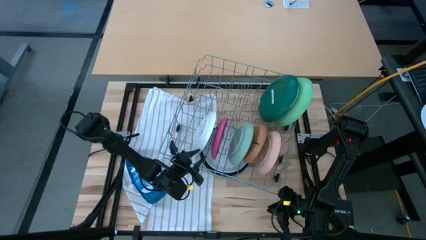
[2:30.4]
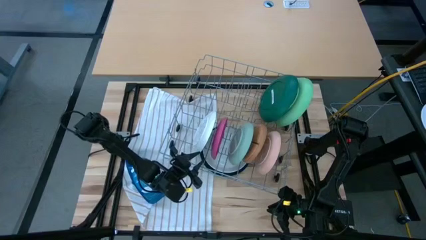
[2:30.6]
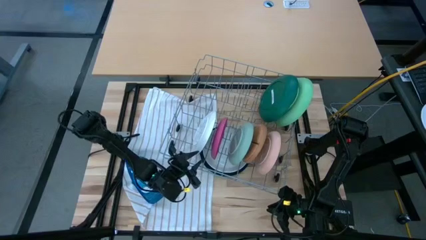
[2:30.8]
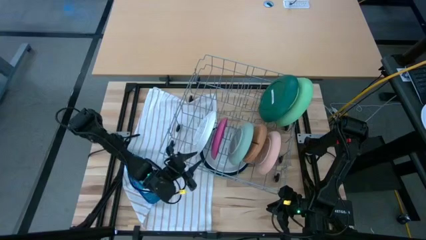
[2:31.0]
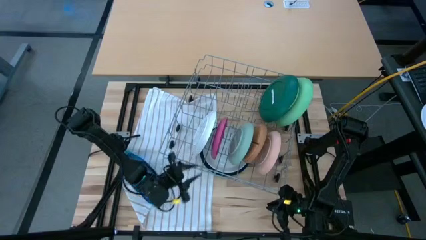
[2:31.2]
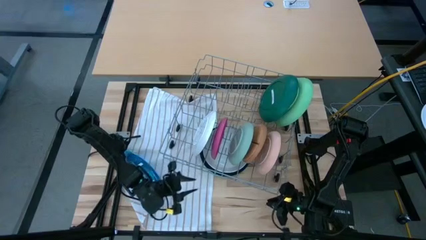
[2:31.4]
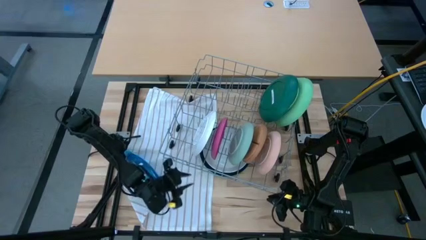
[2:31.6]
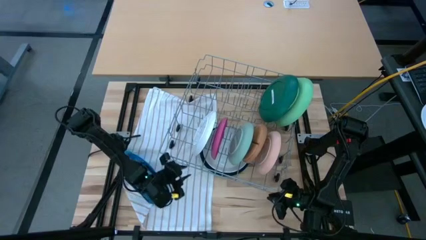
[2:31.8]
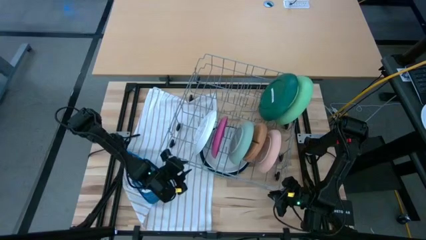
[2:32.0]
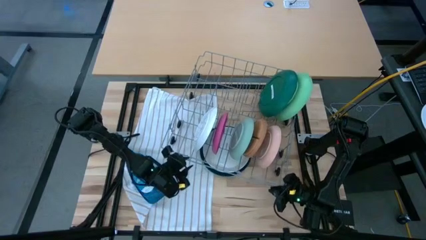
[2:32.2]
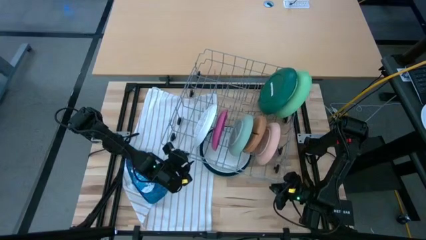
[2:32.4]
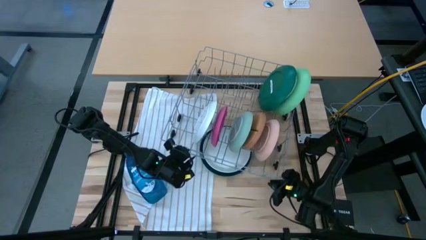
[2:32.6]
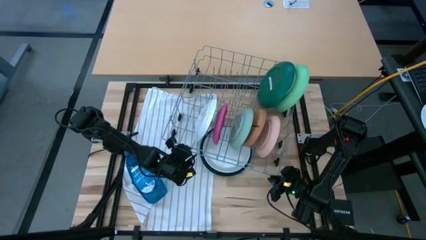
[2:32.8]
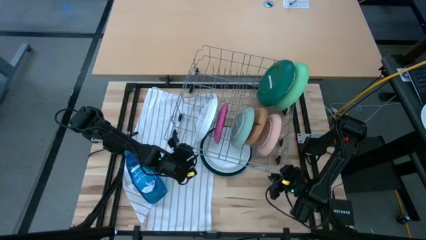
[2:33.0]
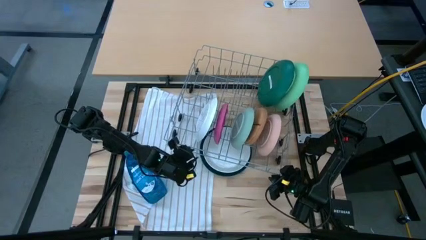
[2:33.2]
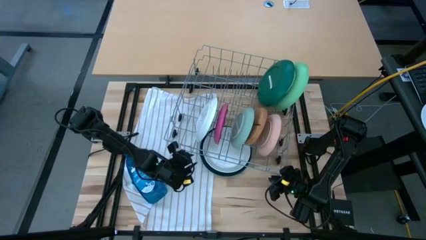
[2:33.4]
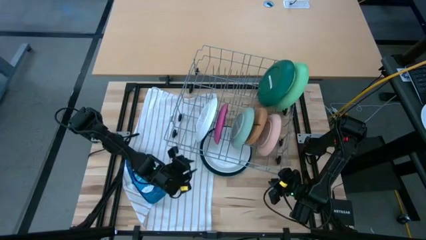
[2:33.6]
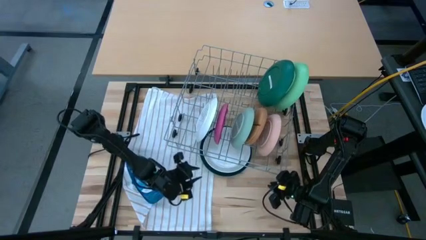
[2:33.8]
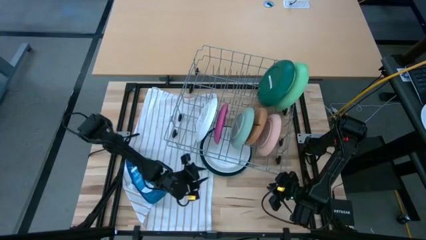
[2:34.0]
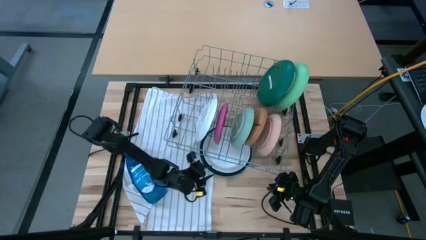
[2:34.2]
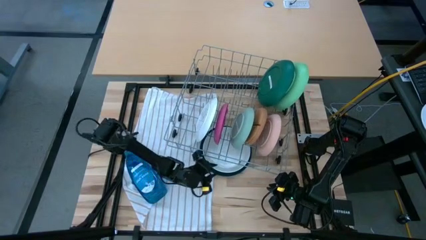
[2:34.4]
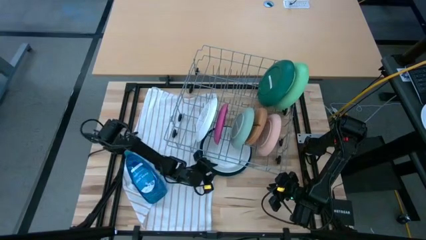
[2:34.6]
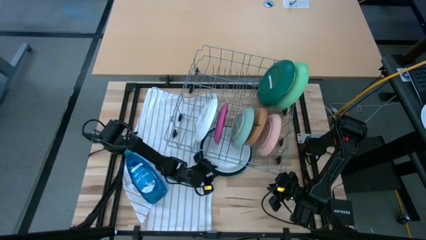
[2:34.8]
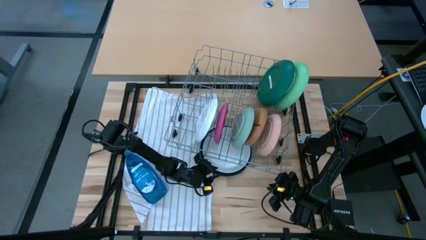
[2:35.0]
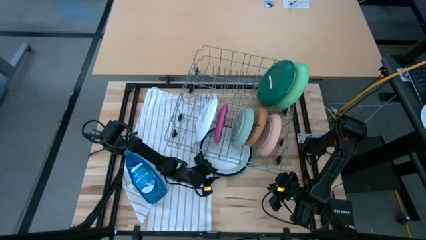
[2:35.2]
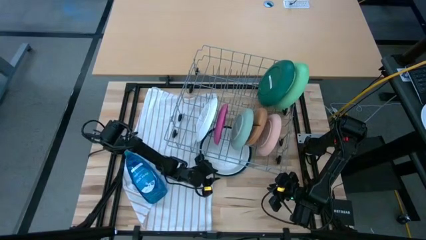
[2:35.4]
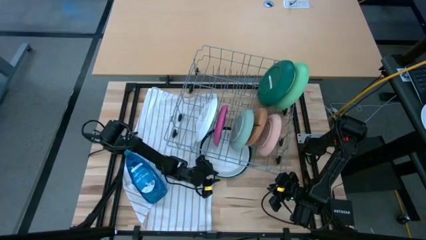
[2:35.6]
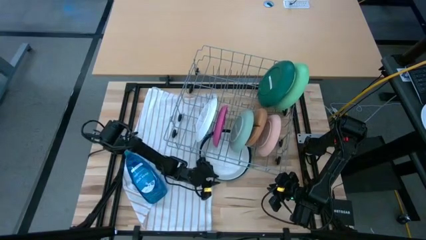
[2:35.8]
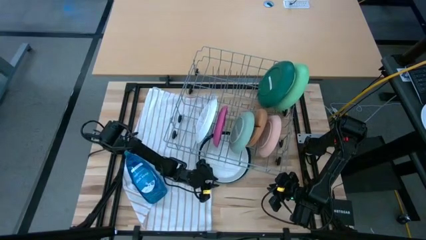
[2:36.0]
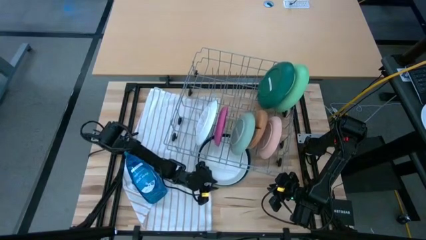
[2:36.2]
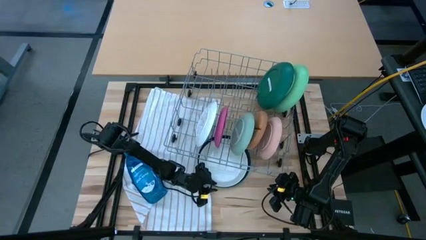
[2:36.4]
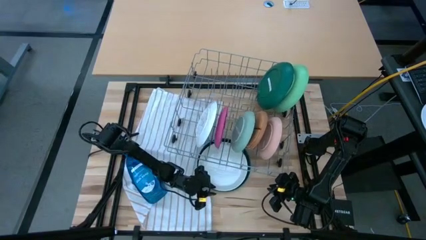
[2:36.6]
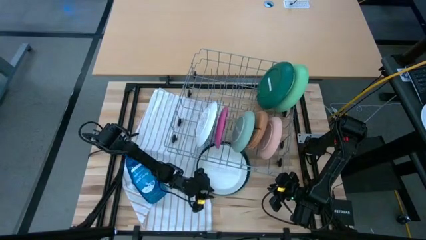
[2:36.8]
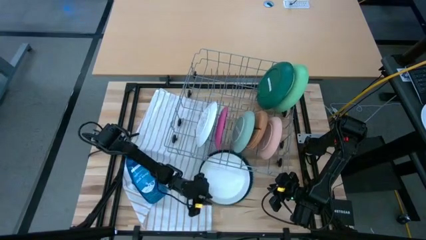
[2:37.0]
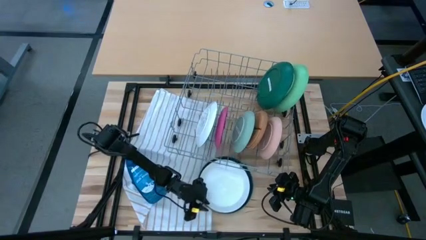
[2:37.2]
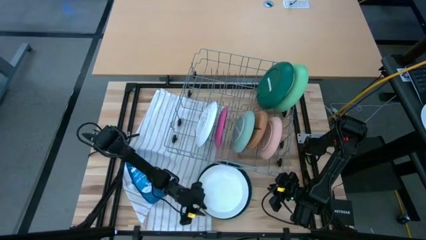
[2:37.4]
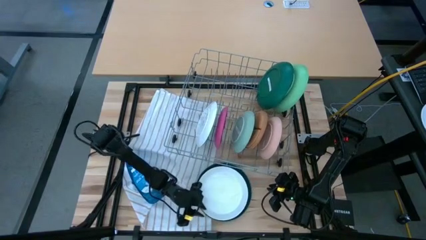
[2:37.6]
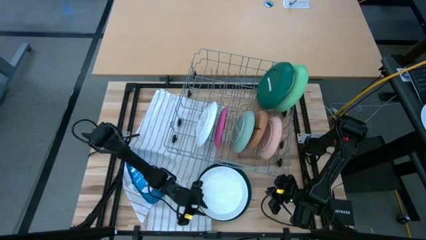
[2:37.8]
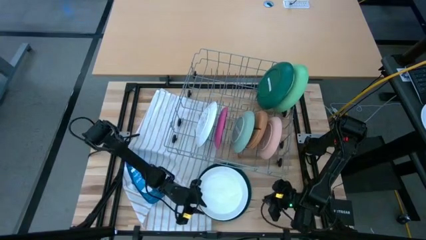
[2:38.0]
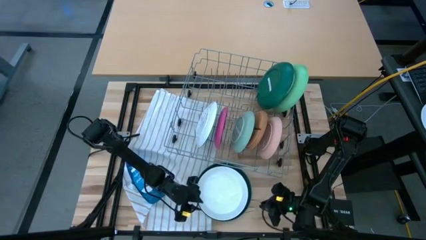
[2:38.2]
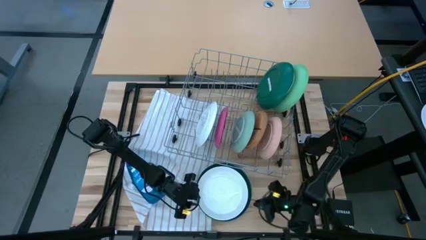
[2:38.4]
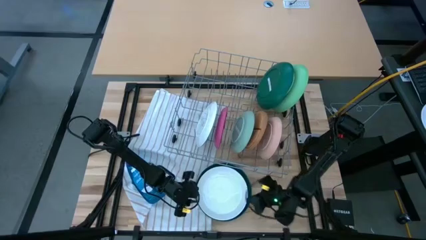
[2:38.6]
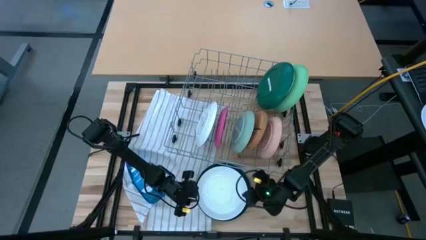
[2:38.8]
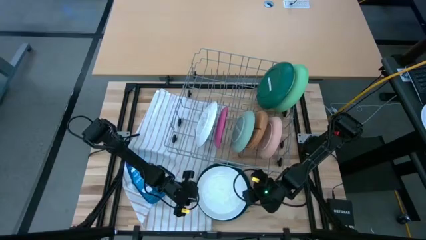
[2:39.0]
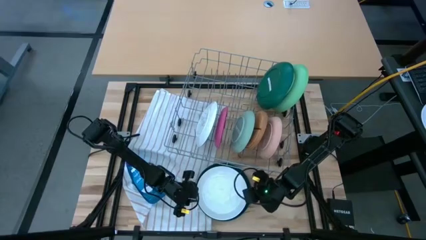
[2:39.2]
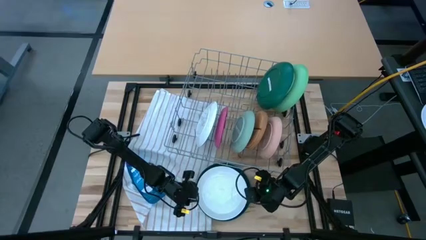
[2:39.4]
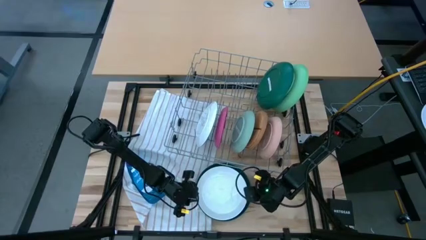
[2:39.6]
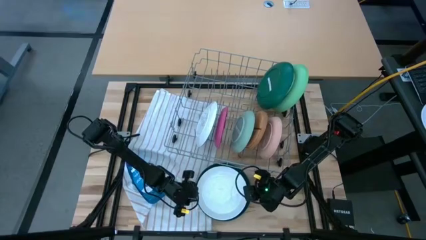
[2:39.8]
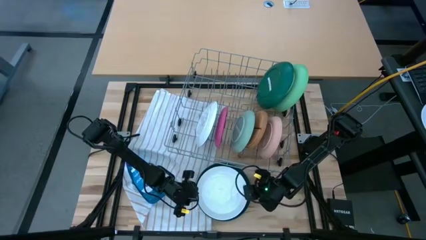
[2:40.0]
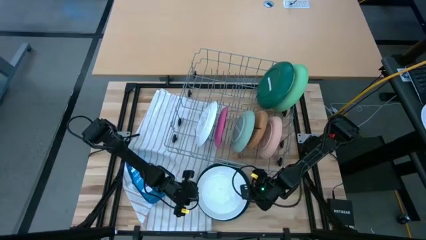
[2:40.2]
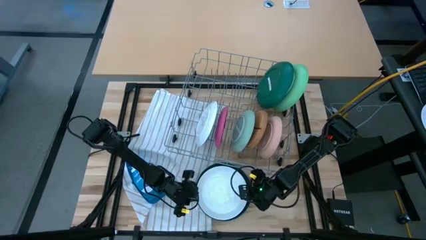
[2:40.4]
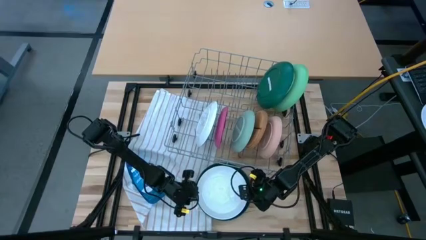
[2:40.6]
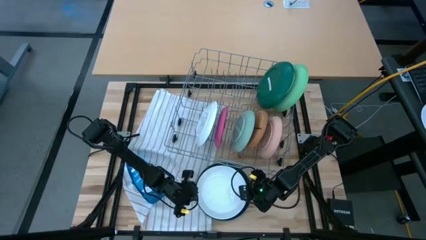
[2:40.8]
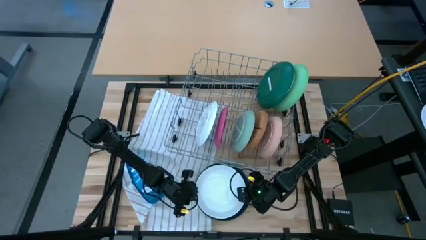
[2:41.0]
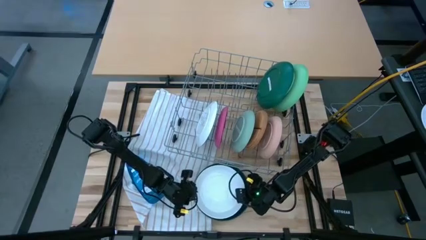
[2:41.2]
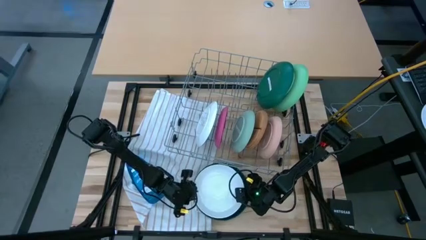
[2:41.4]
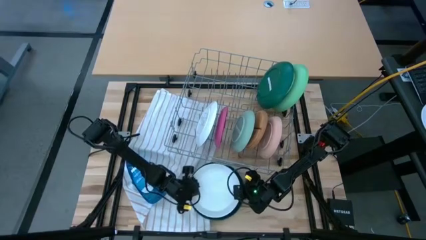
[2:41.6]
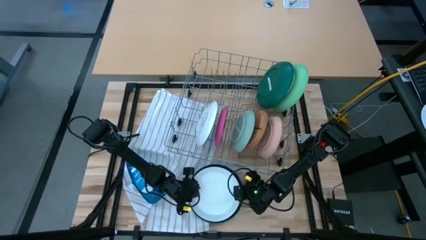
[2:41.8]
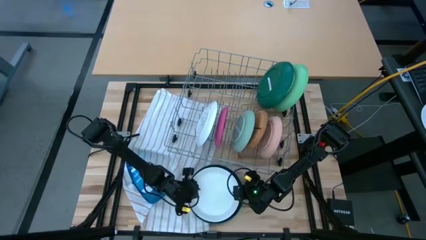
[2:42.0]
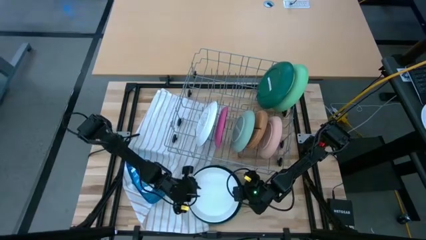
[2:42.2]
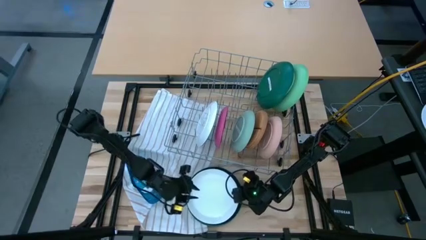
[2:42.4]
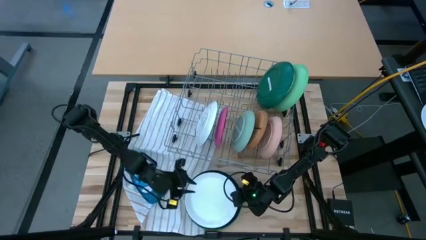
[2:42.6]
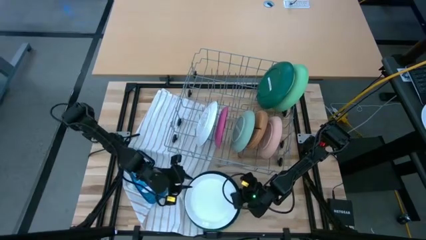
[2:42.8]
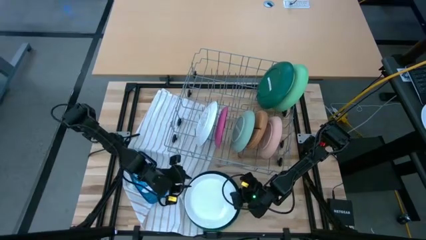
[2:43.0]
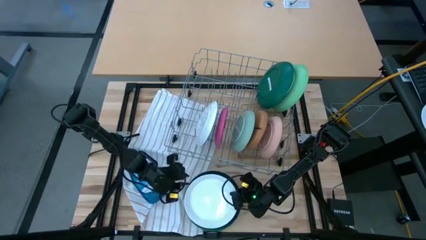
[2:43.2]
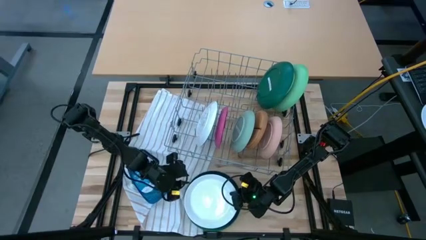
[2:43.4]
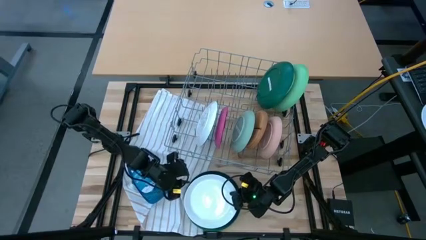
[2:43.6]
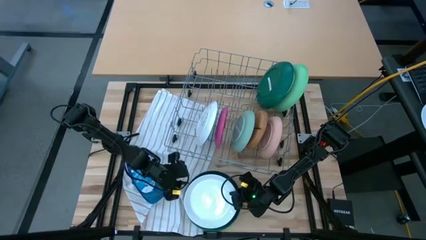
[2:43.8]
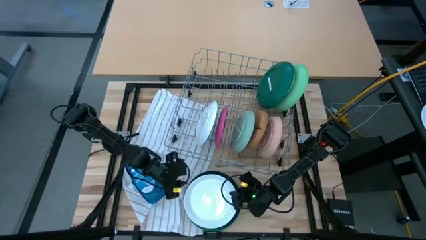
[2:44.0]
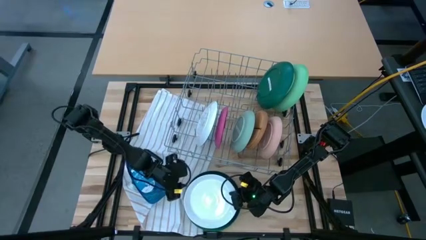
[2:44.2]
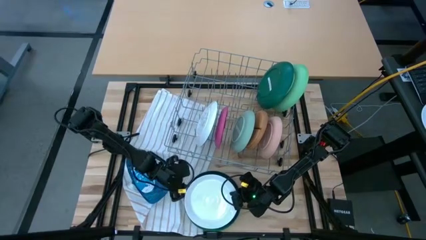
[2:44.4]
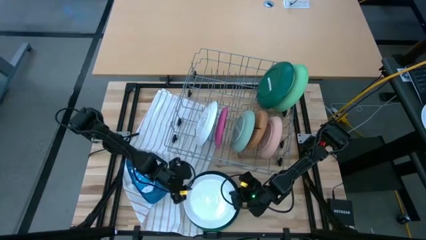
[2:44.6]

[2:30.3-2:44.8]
Task: Sort dishes
Put the white plate in the dish rack

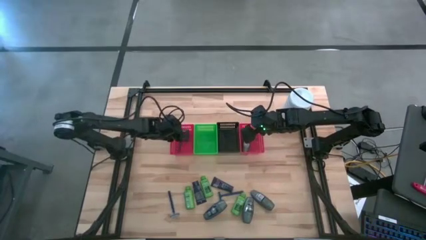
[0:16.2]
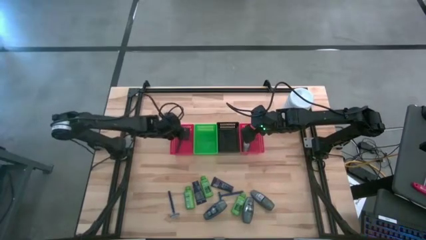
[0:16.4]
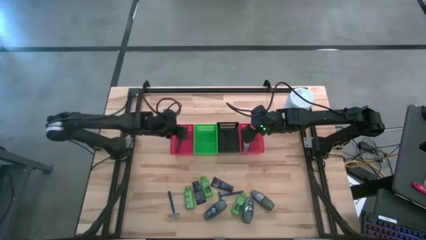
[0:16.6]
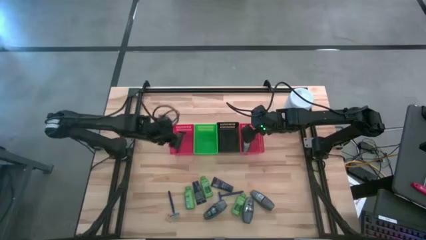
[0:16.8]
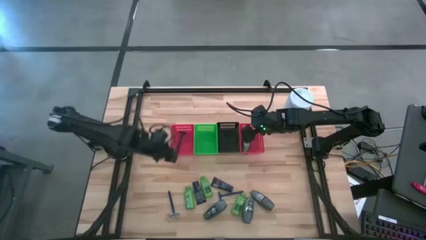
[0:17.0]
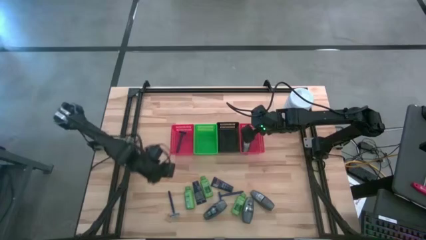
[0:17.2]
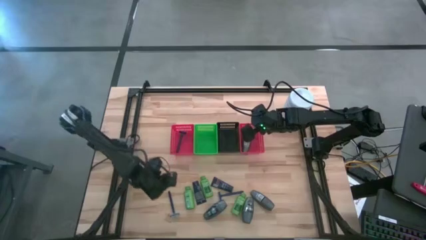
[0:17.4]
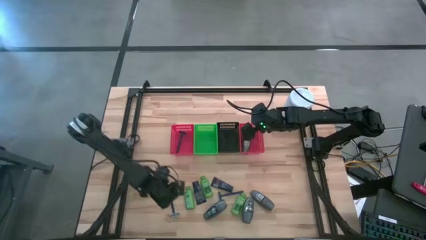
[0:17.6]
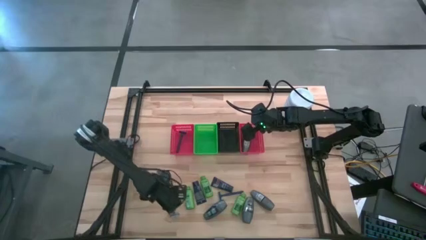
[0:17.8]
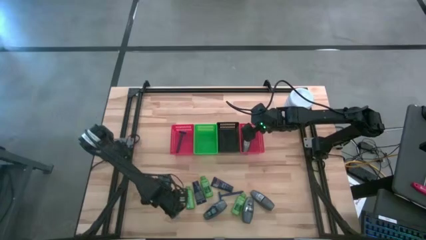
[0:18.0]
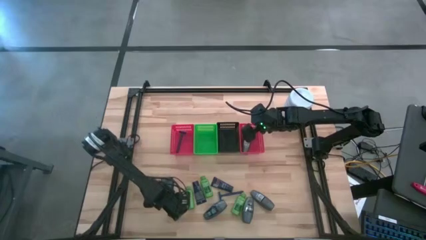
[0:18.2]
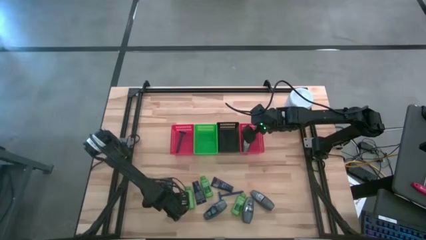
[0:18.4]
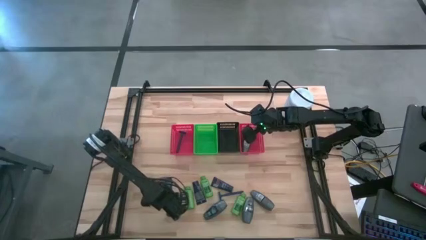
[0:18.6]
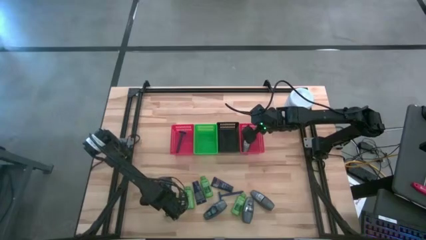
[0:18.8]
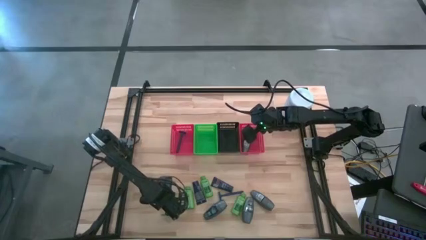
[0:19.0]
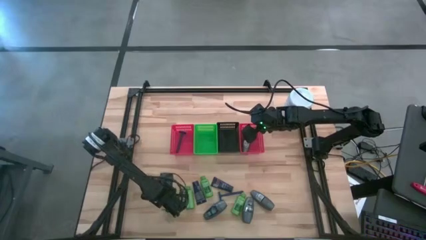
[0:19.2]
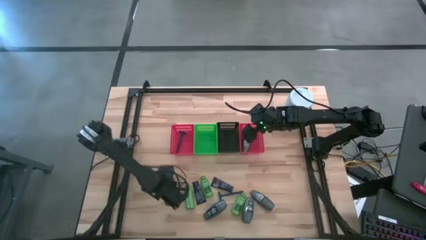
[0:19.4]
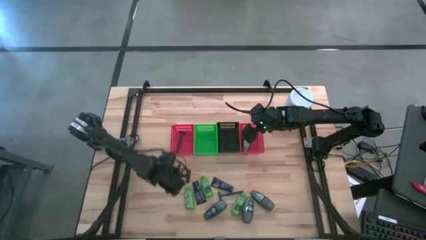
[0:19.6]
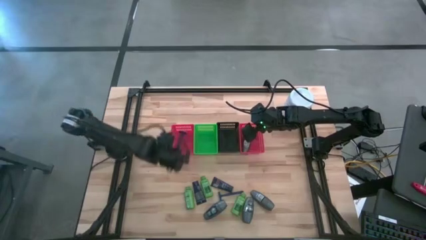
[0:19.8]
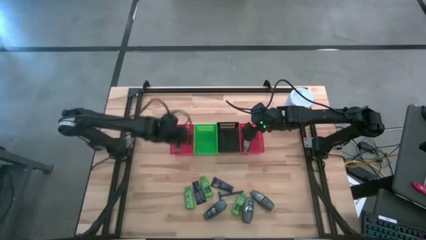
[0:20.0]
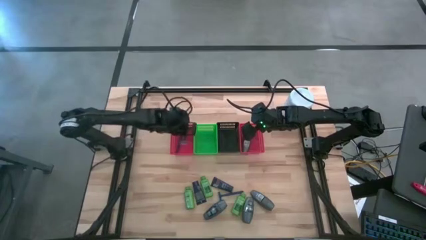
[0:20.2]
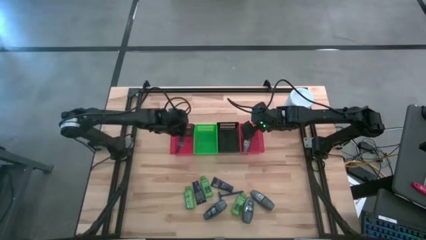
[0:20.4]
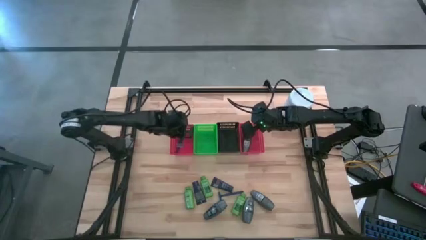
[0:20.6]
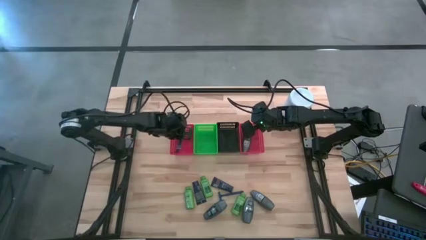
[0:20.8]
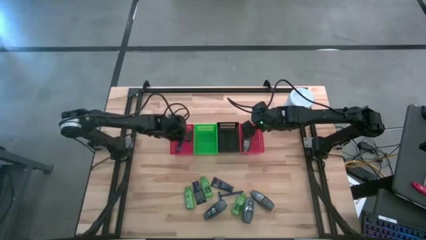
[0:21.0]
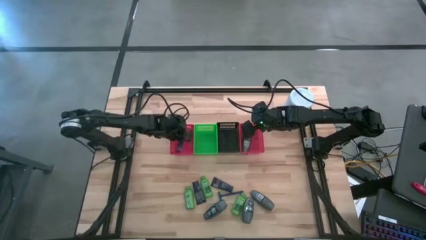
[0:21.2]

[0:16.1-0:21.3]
Task: Pick & Place Travel size toiletries
Put the left blue razor into the left red bin
